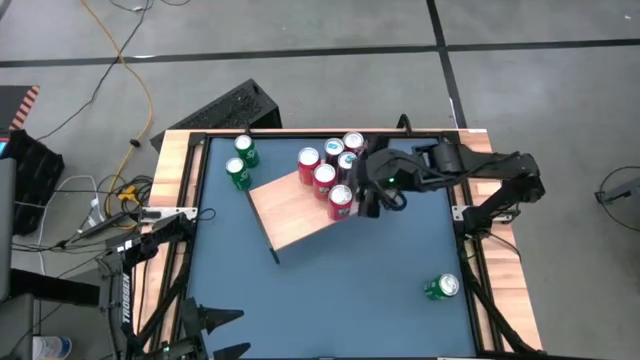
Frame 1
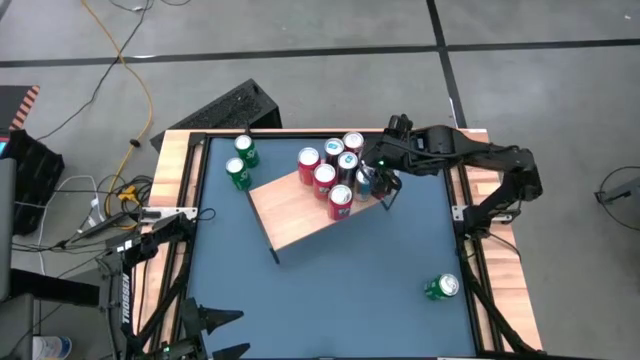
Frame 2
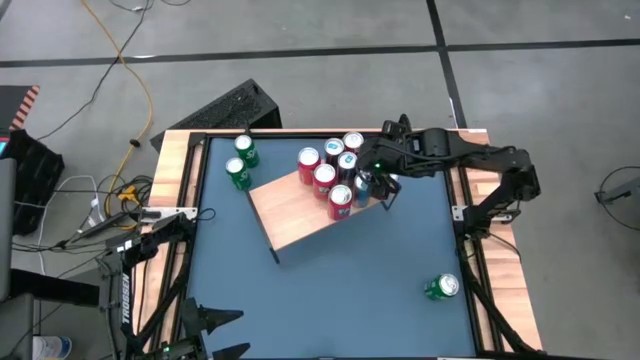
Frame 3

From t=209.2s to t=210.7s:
Task: Place canned beverage on shelf
Adjust the blue soda can on the shelf

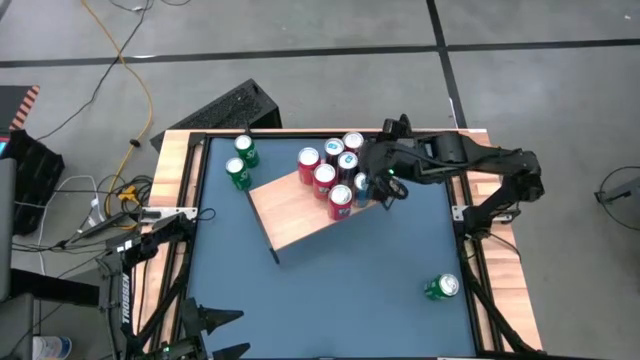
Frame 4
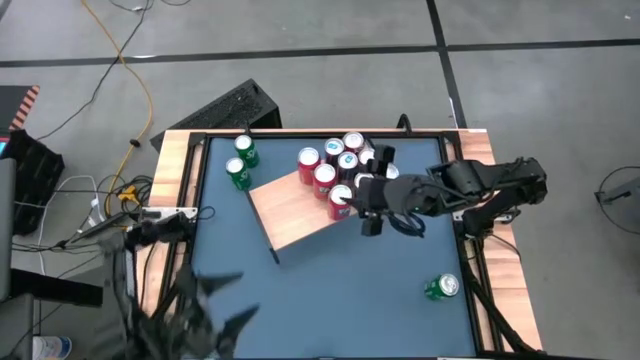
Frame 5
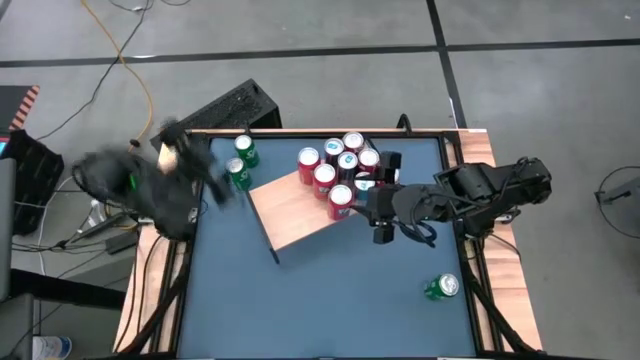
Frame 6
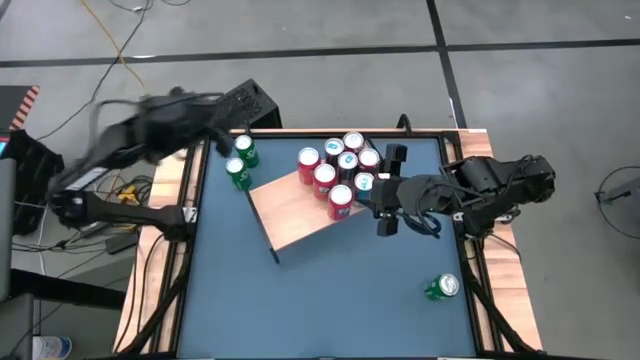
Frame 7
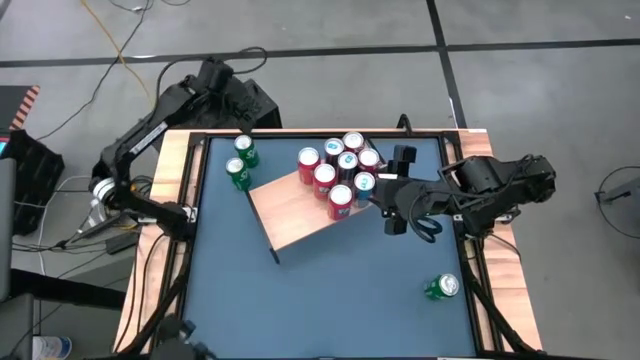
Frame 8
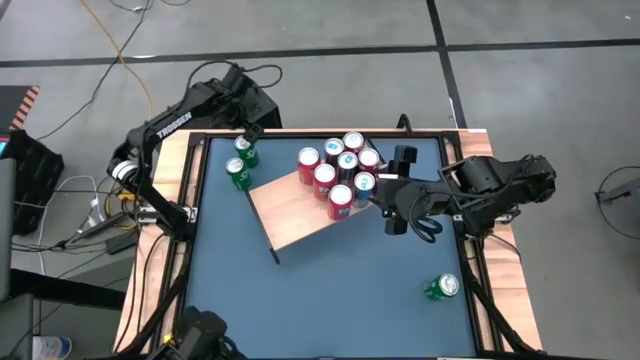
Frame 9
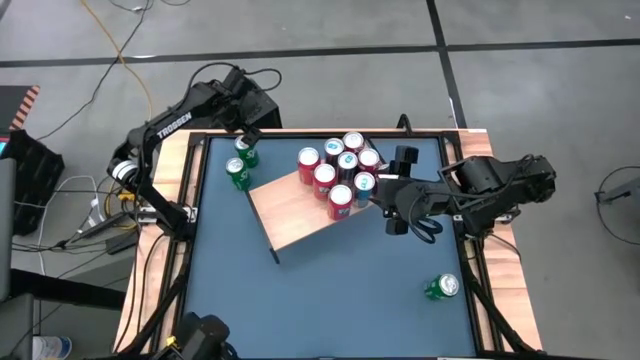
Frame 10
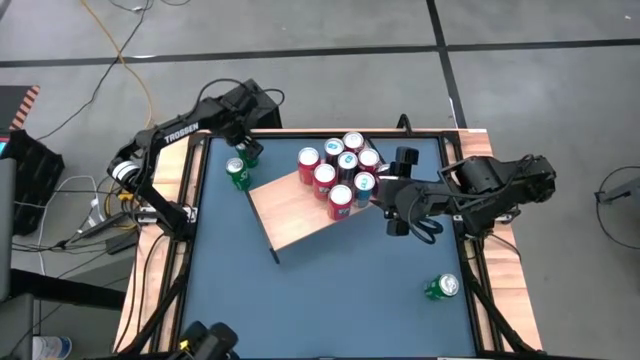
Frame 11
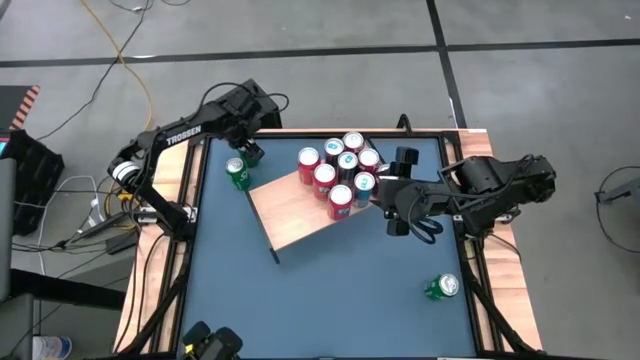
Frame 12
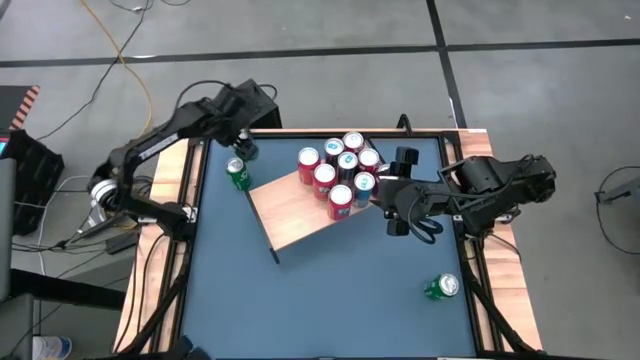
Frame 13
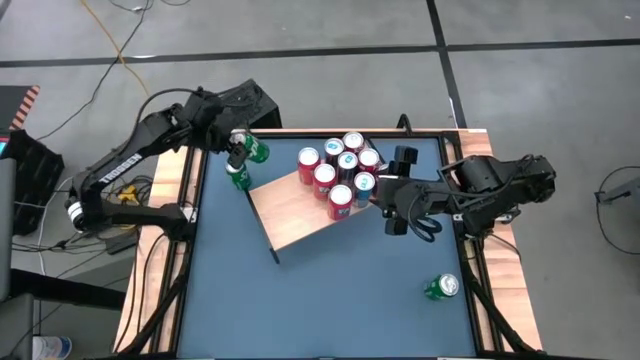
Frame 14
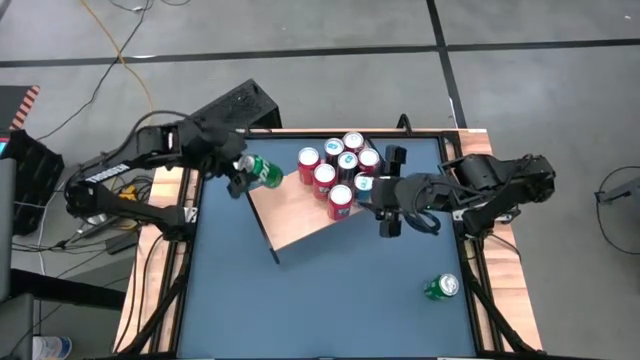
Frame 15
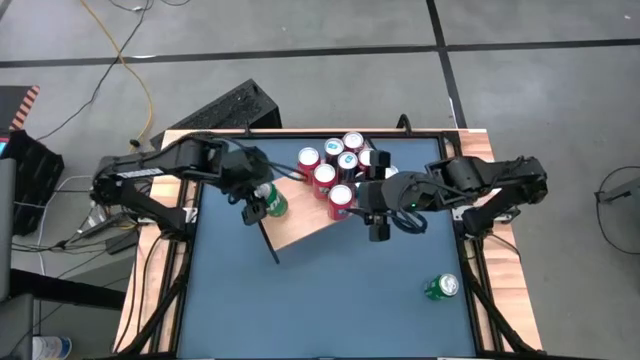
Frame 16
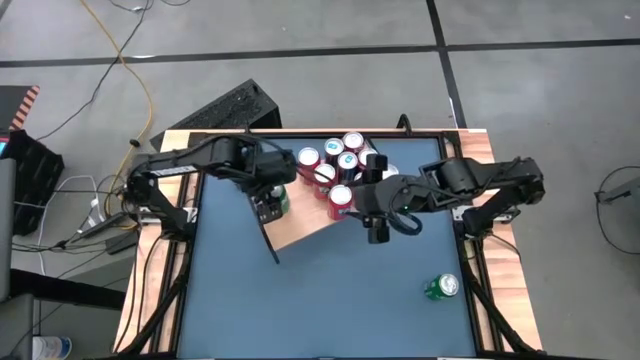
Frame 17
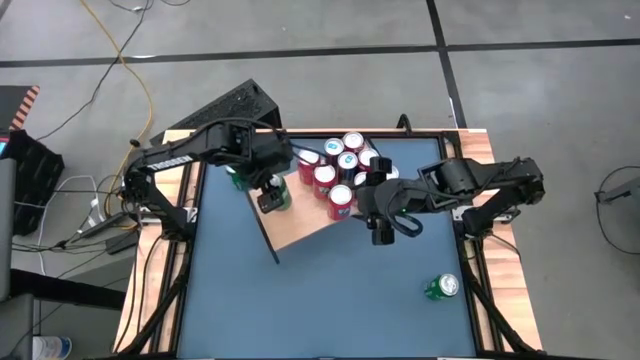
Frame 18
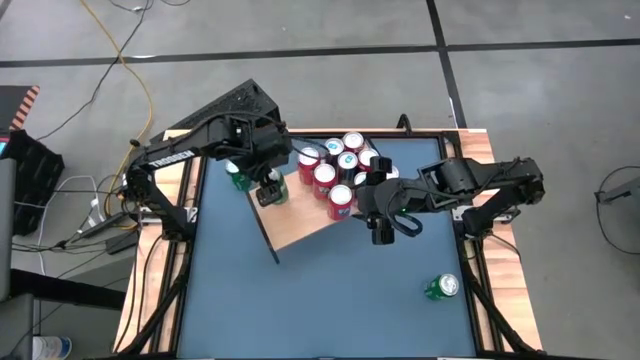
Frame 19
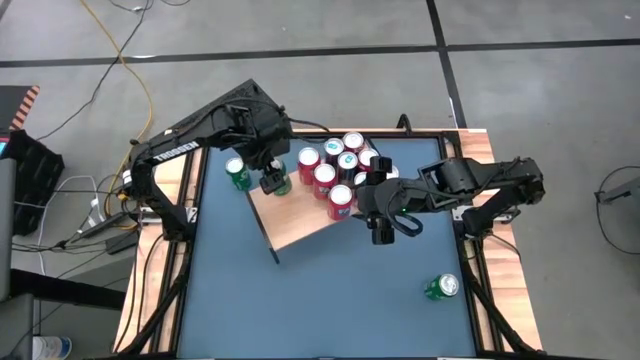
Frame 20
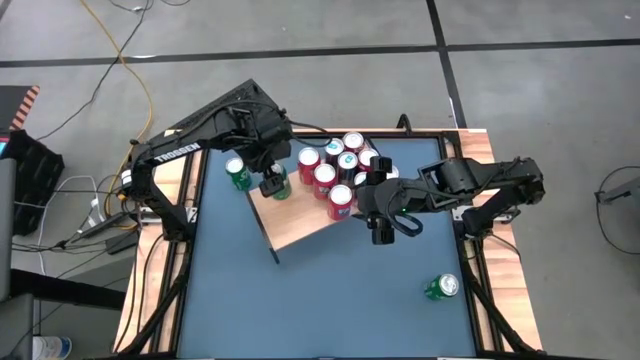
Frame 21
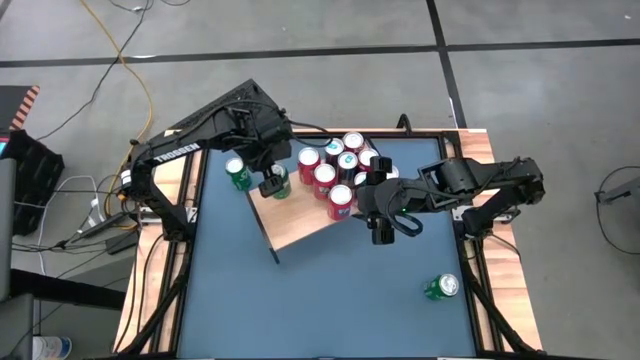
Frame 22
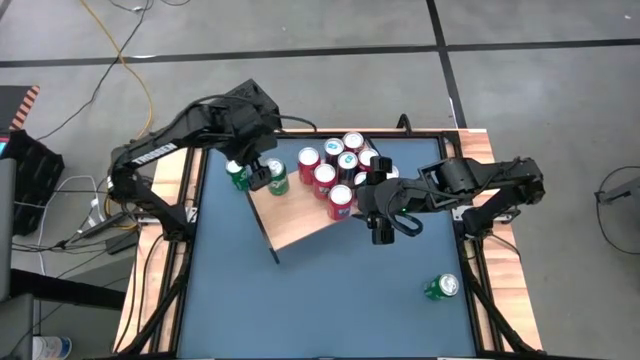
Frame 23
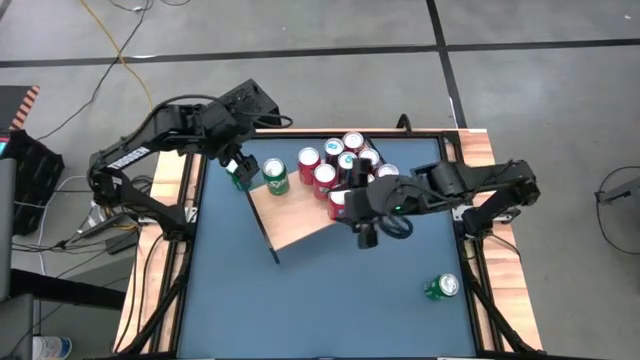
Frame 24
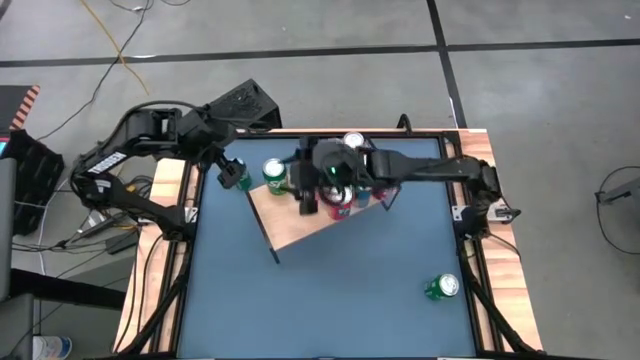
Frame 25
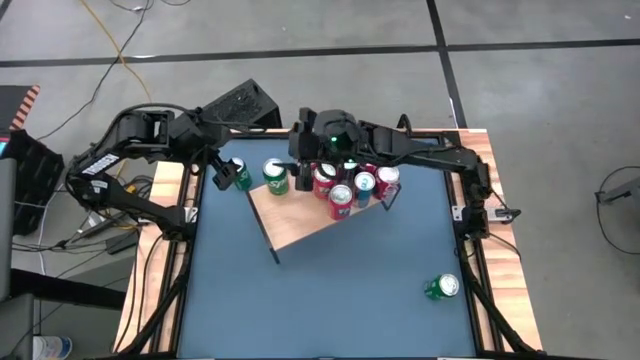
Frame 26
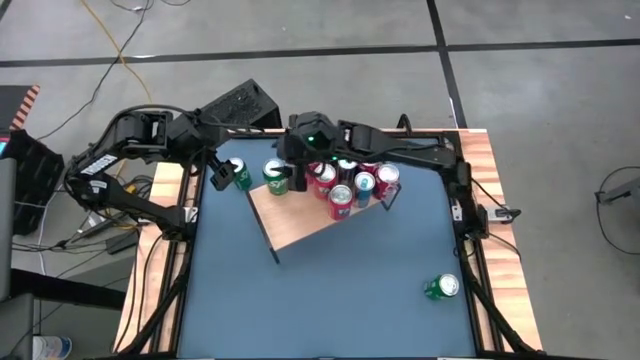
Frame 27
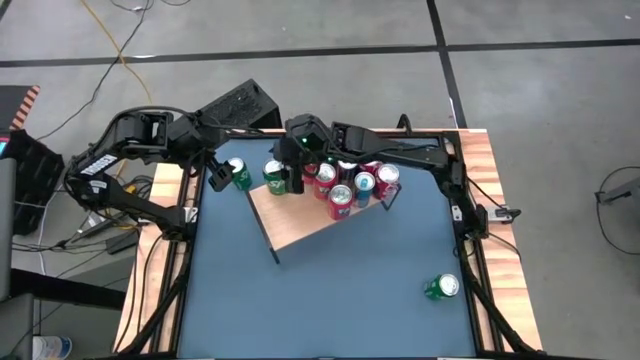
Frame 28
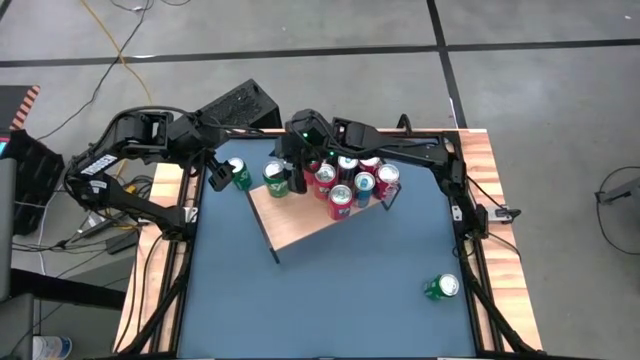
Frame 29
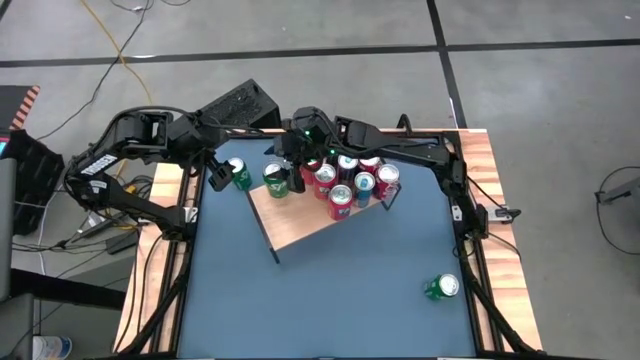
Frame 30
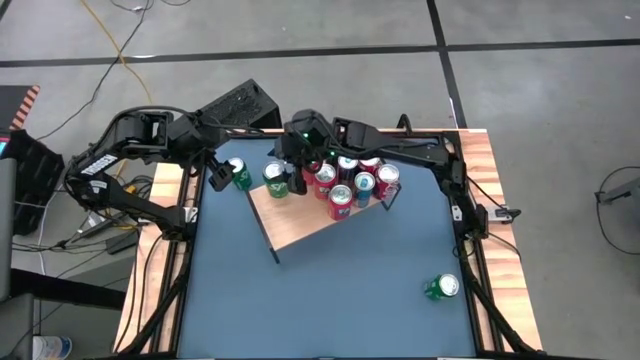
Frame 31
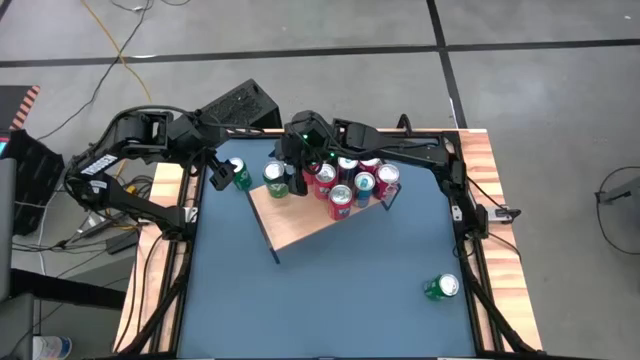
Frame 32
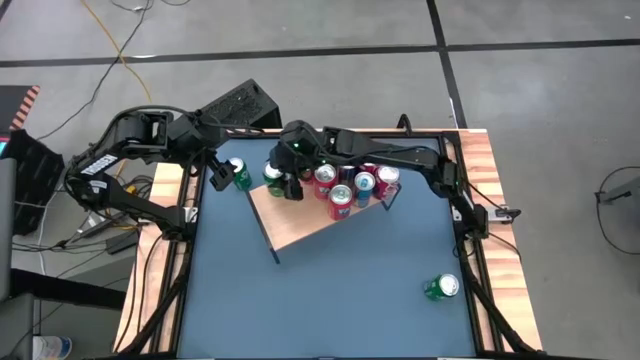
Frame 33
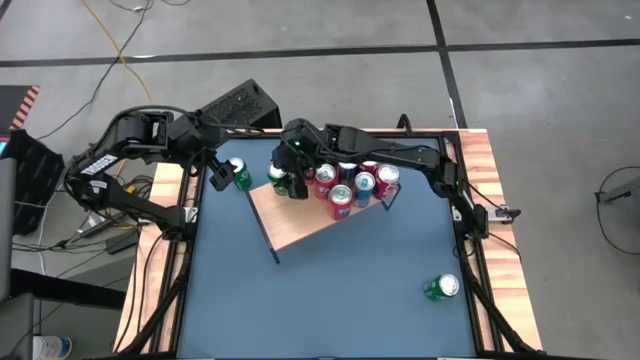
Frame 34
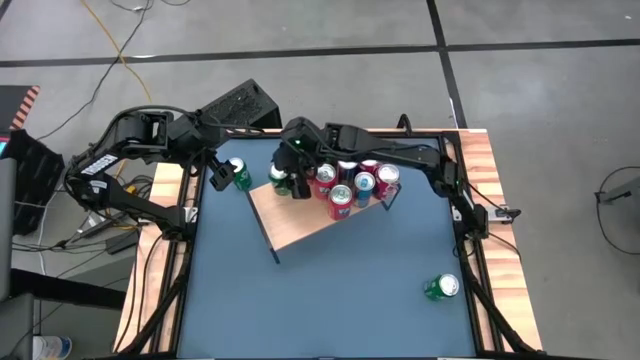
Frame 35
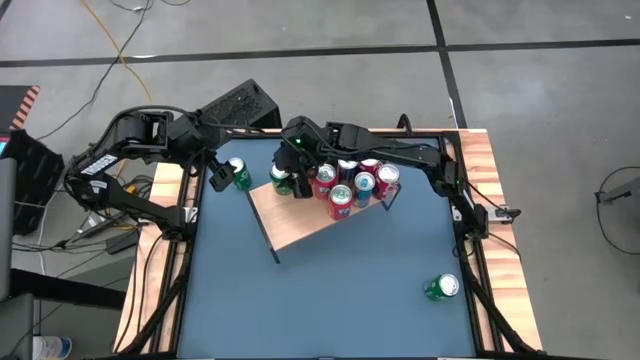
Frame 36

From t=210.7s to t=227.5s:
Put the top green soda can on the shelf

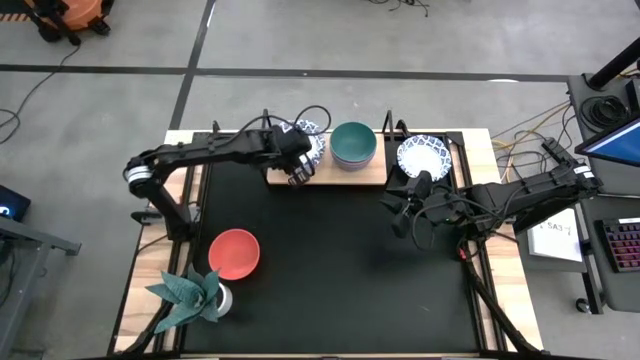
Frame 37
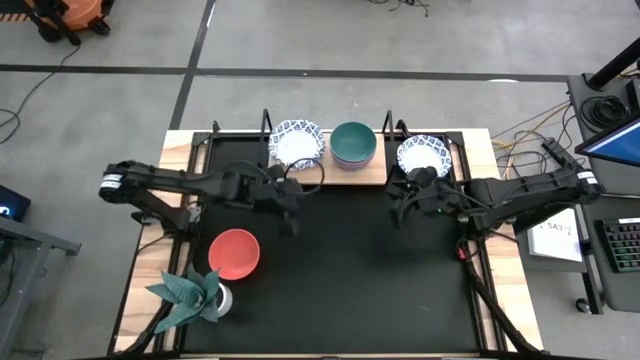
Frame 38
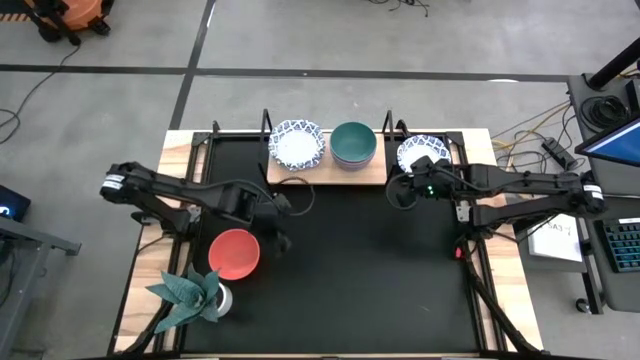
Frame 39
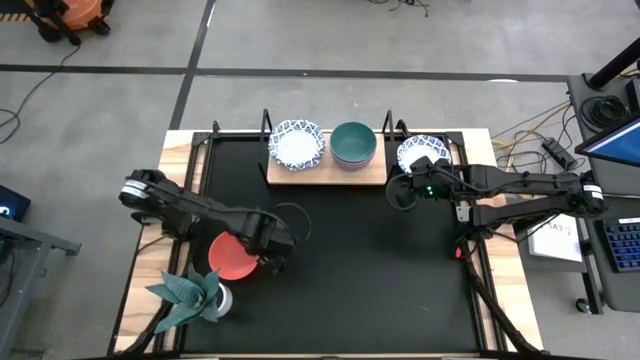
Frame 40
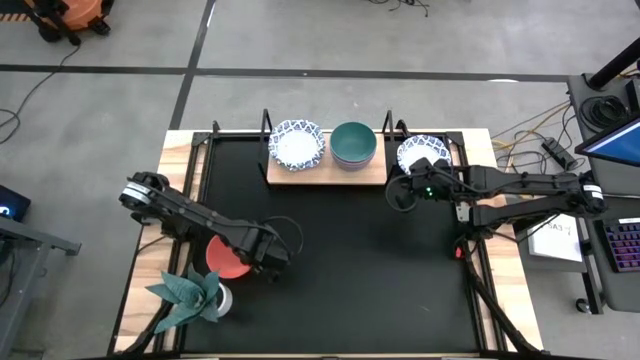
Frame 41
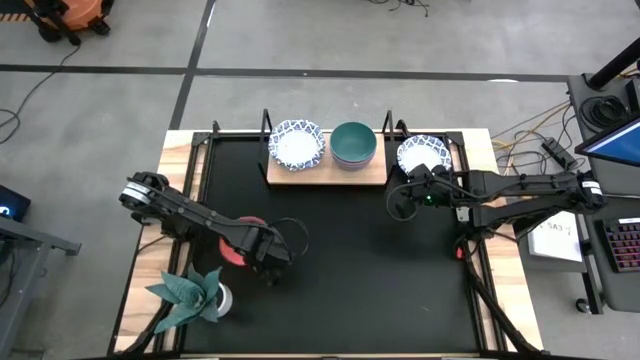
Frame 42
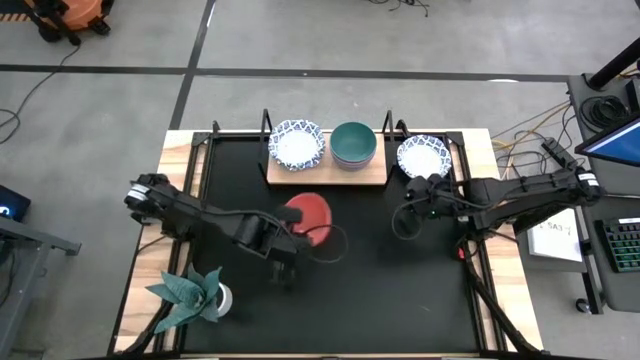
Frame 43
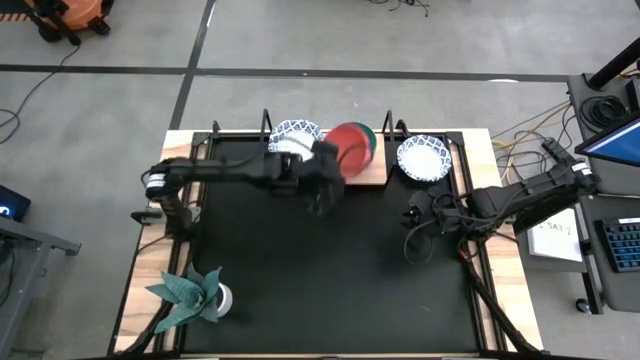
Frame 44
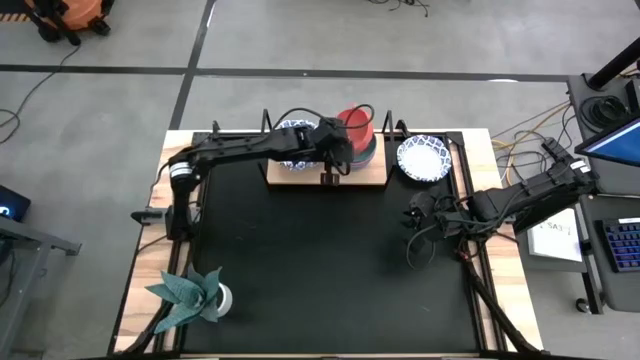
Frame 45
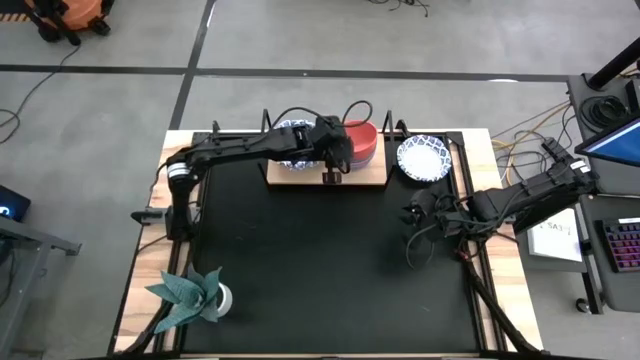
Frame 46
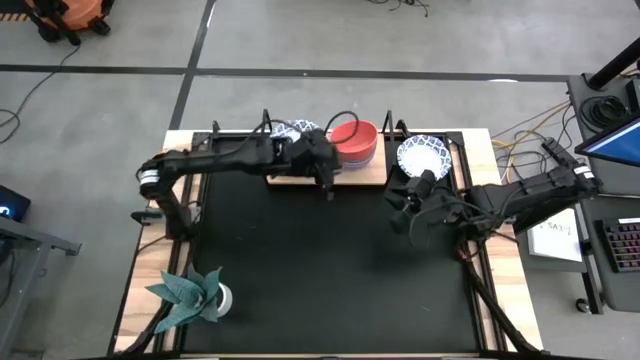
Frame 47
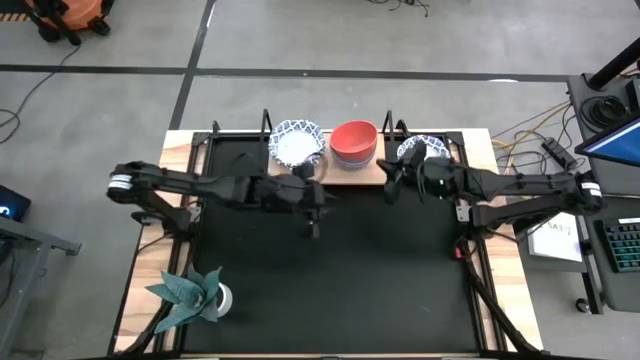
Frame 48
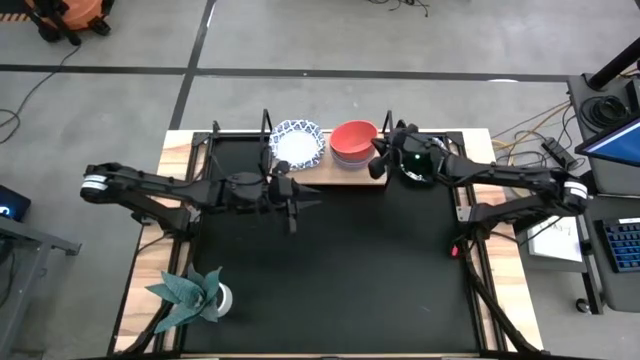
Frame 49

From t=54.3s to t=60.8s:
Task: Place and stack bowls onto a shelf
Stack the orange bowl on top of the green bowl on the shelf
